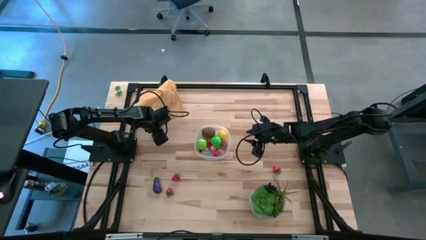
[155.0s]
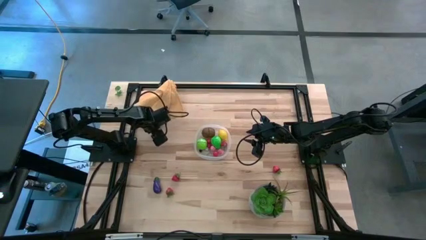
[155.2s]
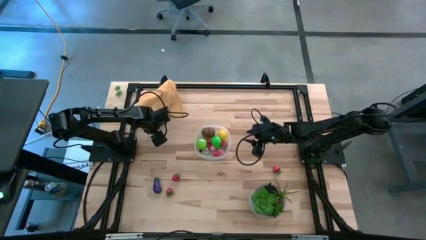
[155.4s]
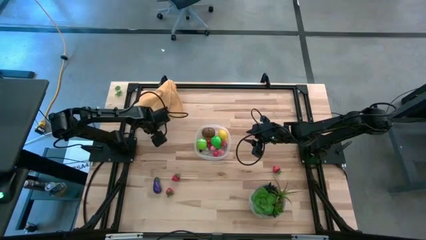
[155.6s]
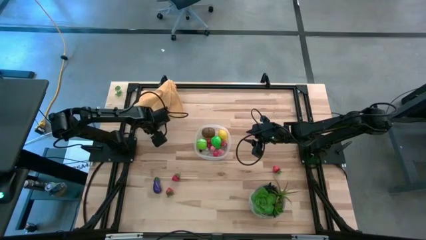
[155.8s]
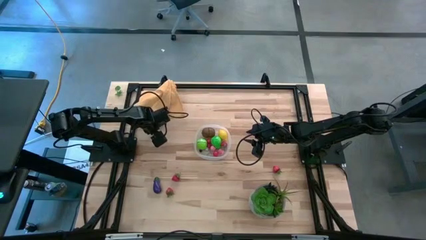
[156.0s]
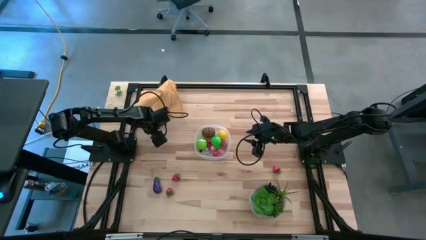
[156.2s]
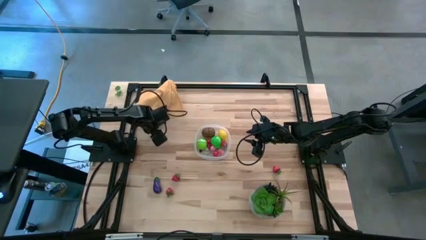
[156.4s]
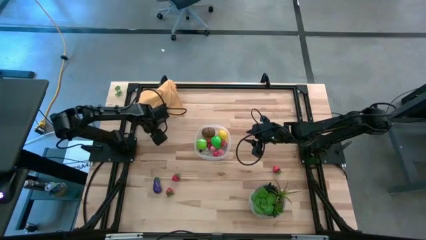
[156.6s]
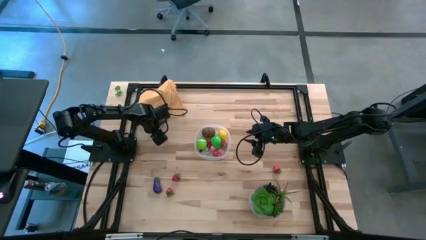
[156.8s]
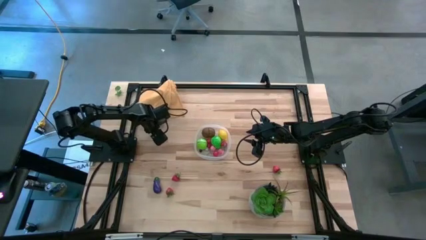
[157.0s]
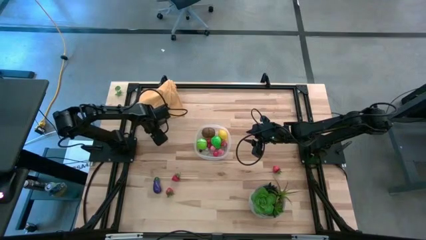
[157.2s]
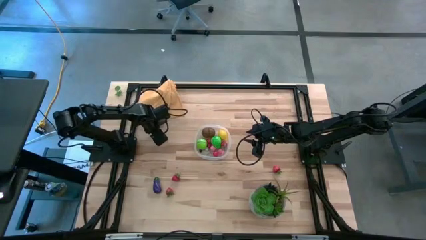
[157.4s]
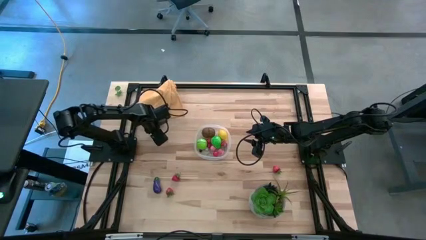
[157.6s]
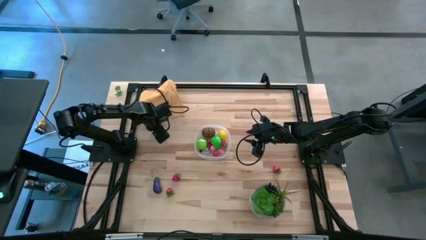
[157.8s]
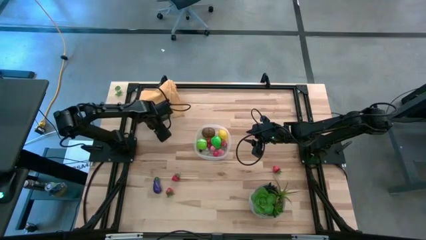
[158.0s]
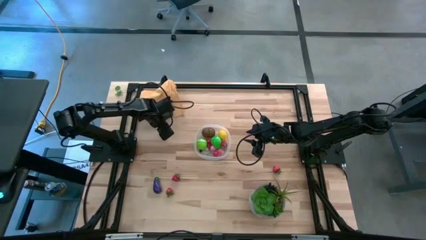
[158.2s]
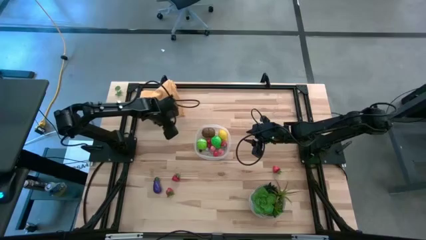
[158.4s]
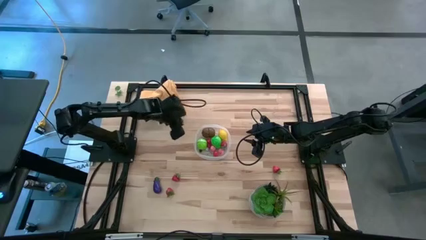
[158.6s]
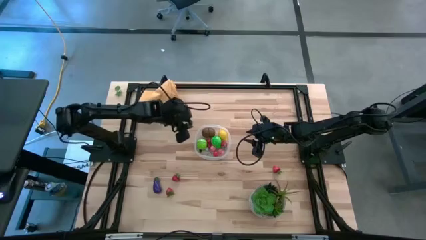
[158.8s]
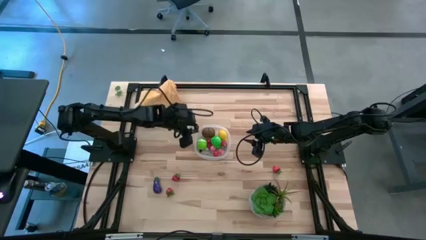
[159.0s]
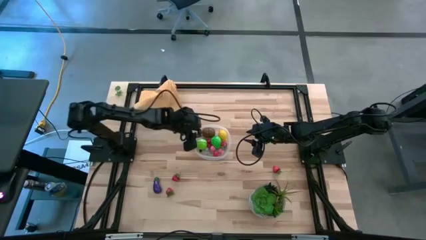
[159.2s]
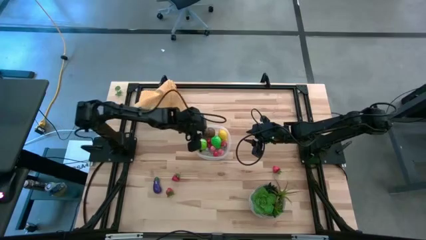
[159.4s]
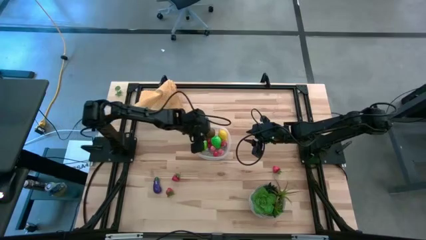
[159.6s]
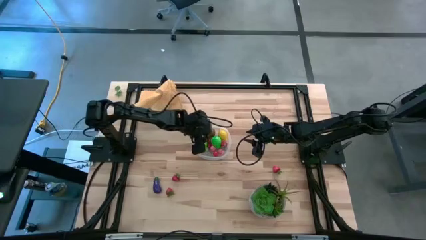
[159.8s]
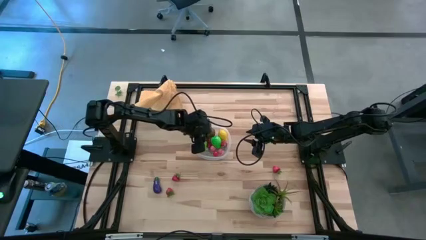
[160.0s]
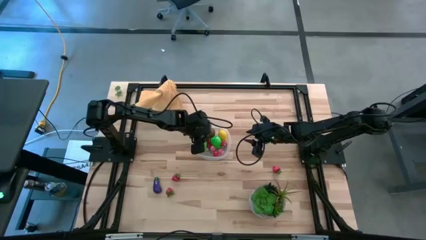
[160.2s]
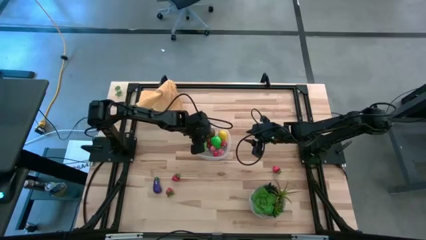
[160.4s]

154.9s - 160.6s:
Task: Pick and placing Produce into tupperware
Put the blackberry into the transparent bin

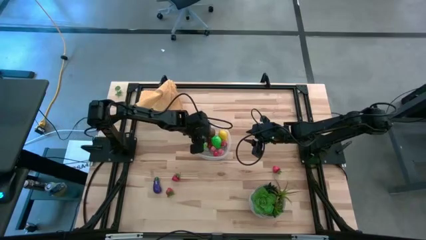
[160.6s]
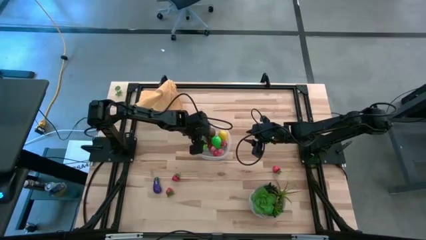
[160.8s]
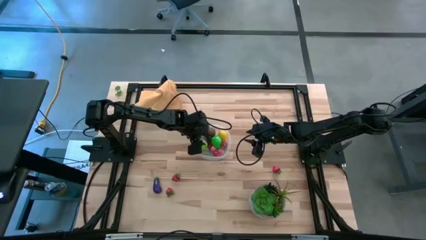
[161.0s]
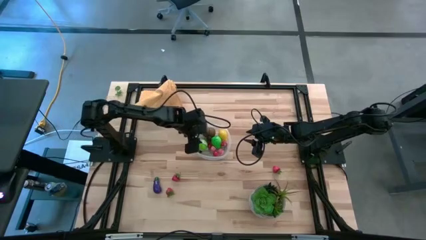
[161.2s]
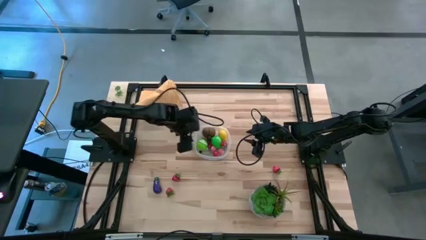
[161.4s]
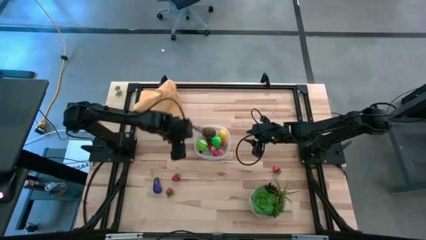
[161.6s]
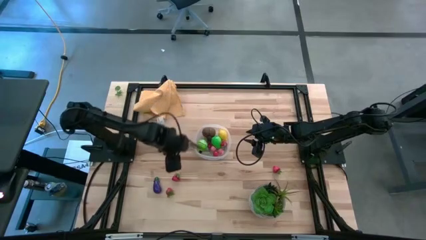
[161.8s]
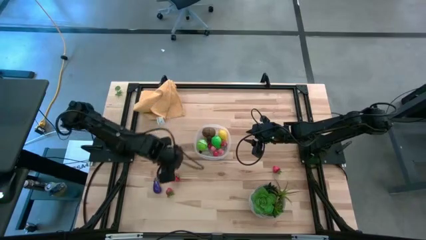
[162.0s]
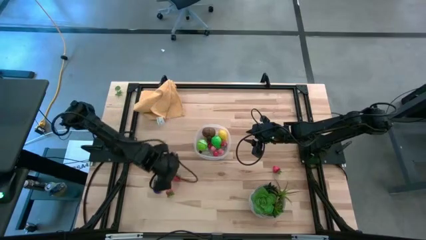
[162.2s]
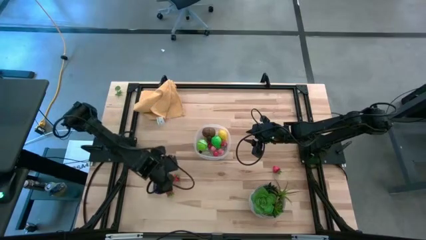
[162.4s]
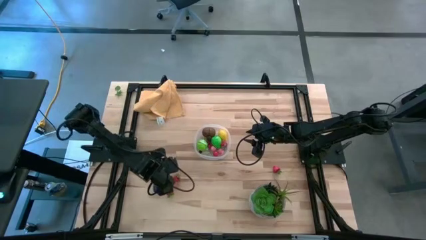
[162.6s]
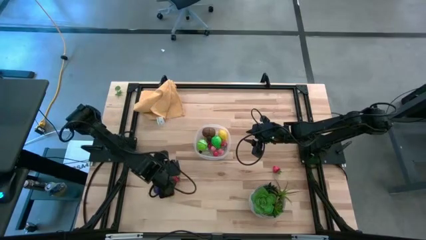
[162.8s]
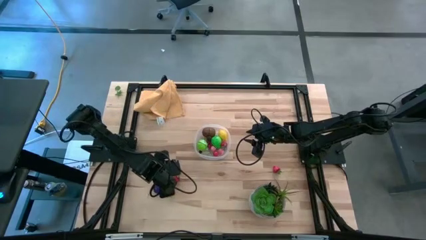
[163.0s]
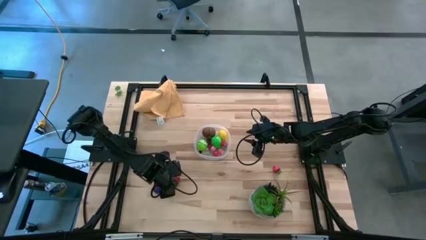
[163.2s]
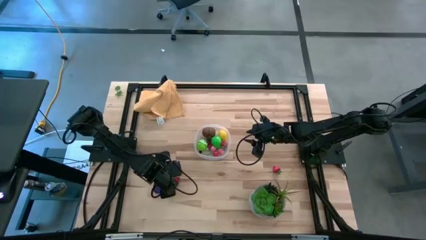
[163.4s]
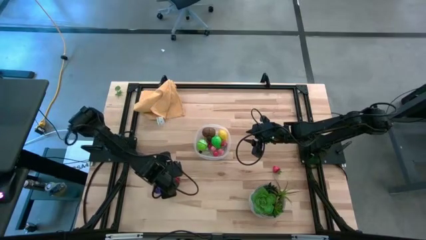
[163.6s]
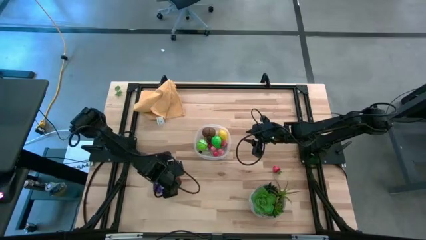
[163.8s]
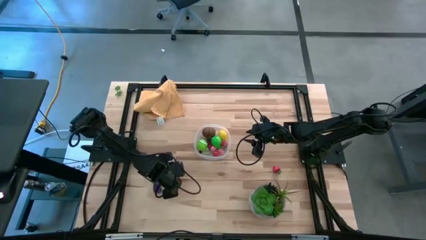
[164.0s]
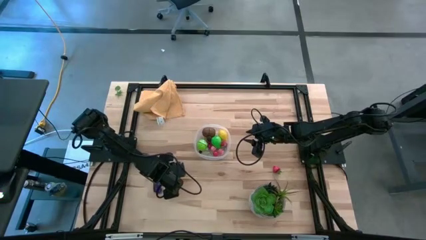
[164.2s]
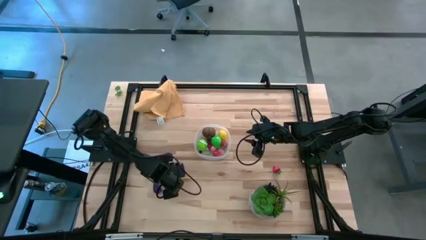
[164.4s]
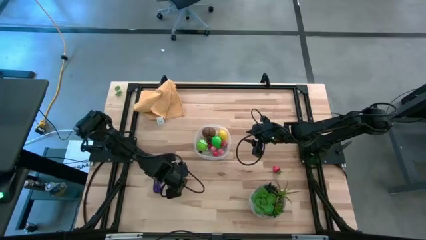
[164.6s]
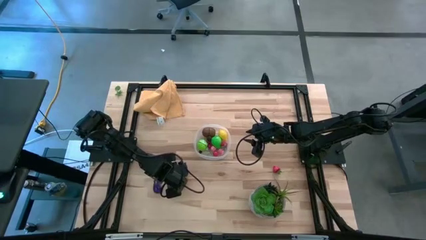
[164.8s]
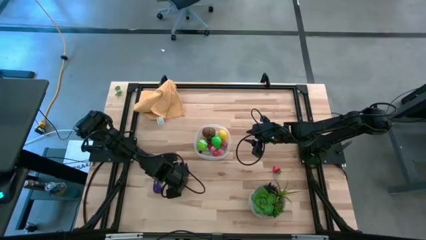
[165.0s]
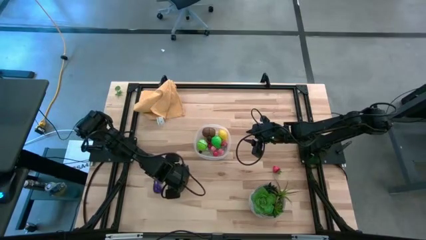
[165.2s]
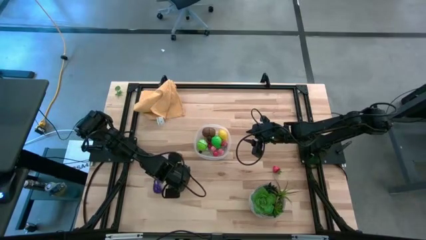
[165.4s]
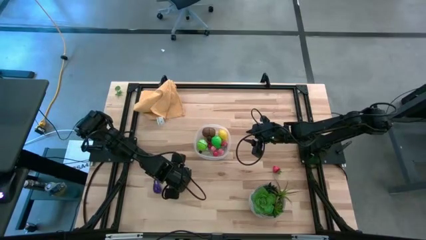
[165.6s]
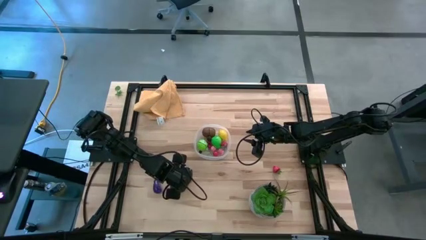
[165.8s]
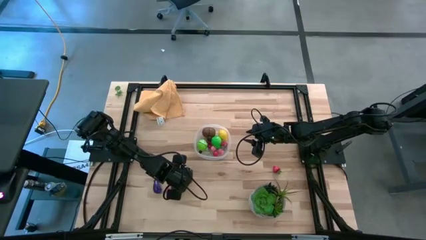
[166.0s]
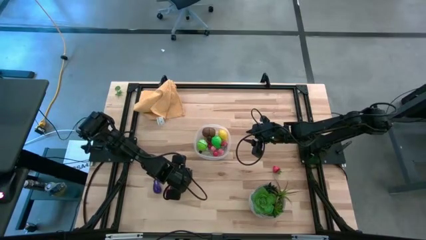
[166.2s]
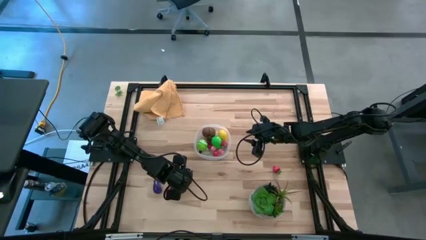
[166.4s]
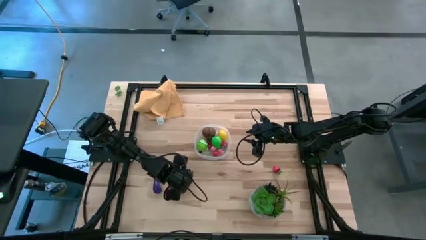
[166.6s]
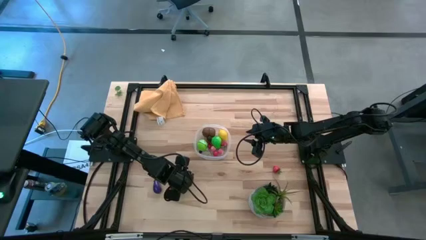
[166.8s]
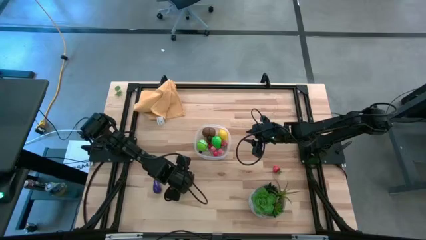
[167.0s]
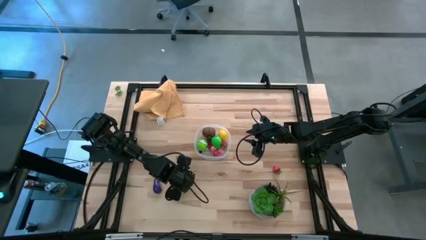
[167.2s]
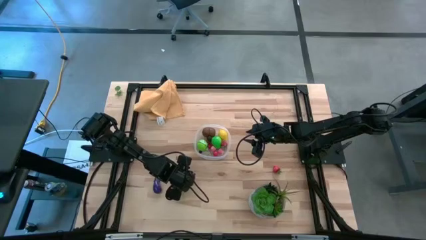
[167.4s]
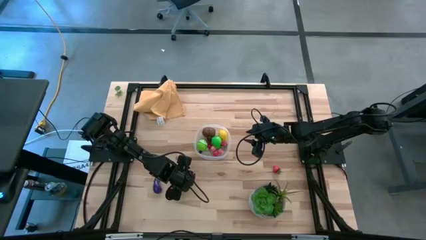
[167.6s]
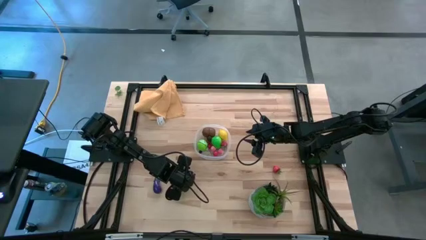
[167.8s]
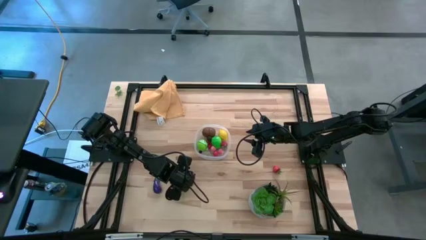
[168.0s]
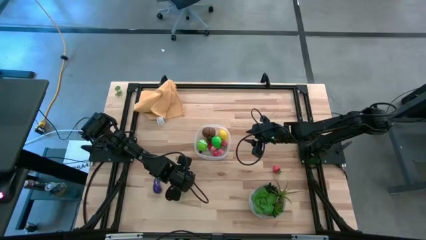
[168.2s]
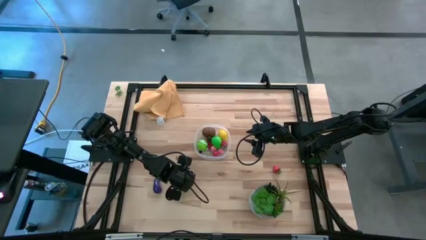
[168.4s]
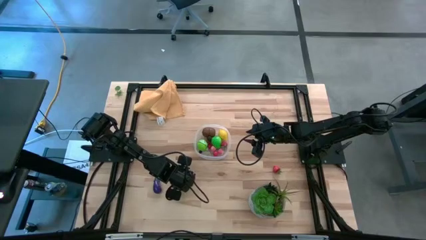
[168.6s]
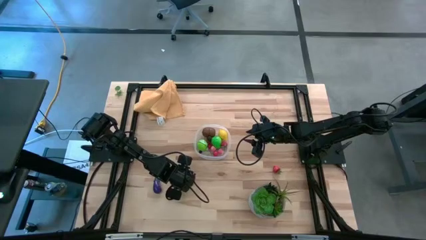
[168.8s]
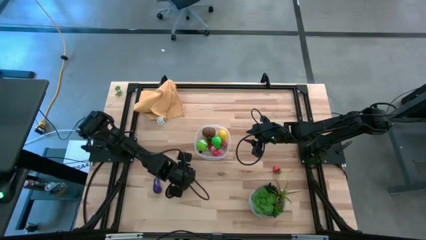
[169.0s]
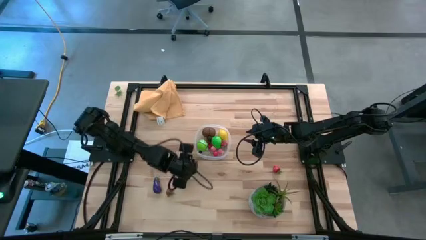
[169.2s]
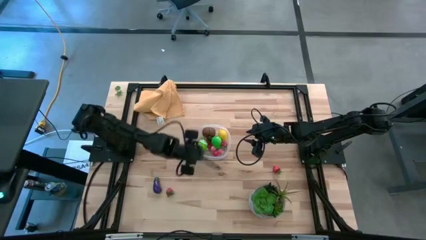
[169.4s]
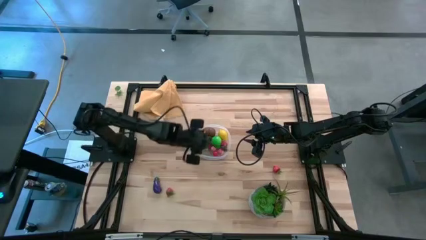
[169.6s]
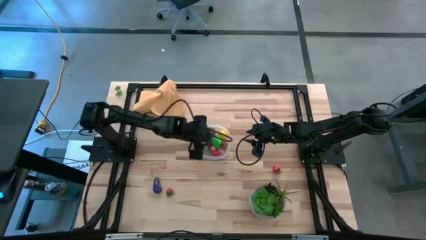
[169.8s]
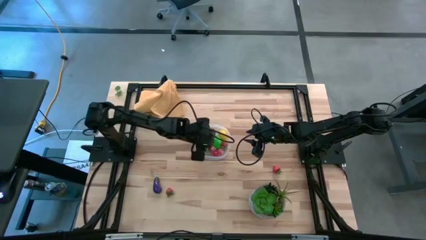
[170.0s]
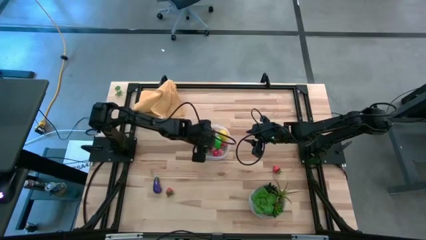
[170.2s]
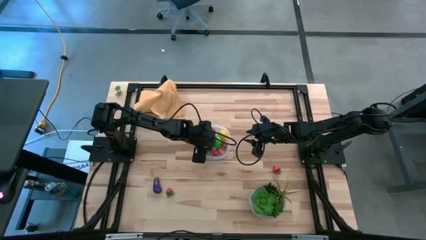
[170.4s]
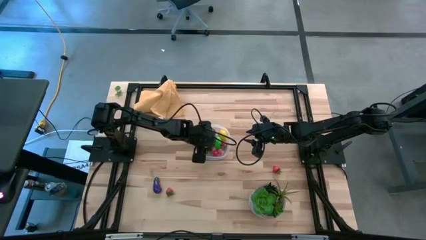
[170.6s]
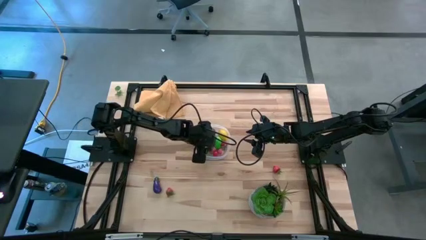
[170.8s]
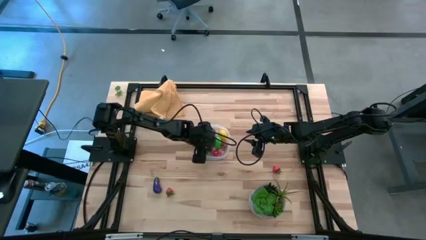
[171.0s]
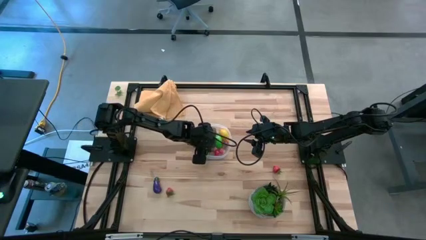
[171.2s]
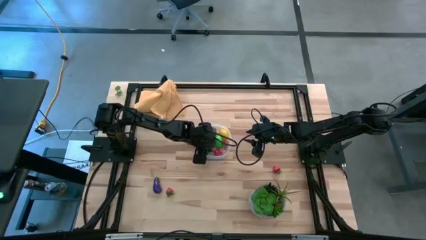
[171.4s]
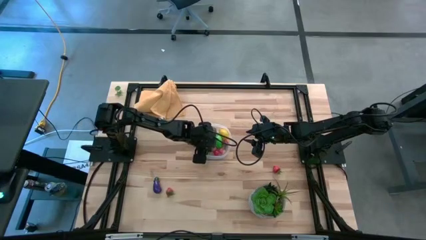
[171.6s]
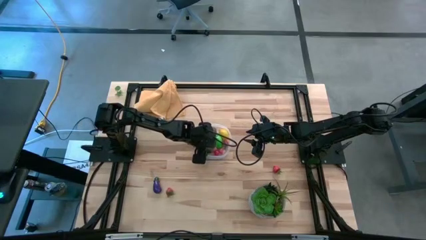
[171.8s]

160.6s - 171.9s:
Put the top left strawberry into the transparent bin

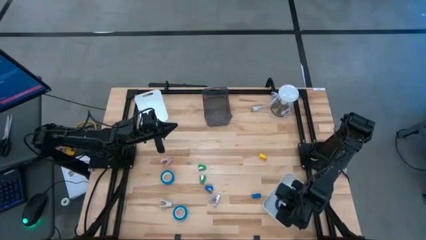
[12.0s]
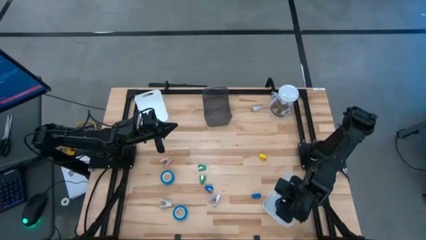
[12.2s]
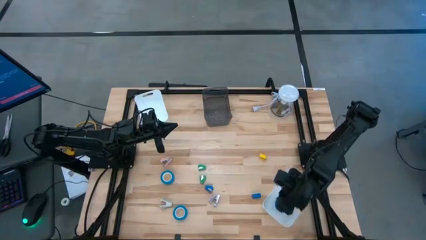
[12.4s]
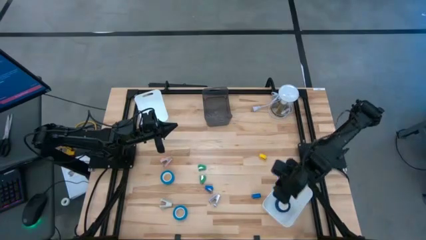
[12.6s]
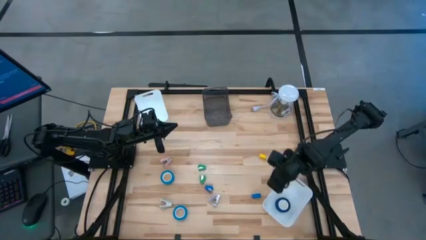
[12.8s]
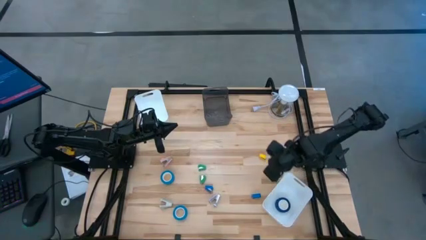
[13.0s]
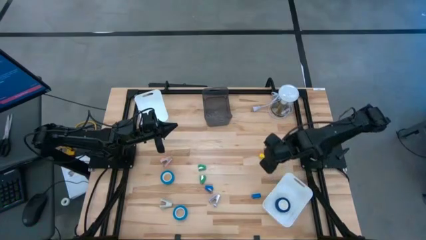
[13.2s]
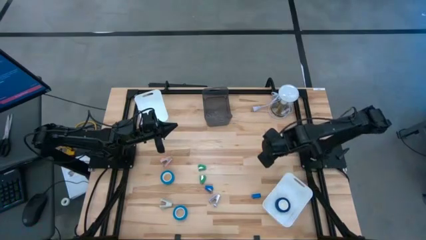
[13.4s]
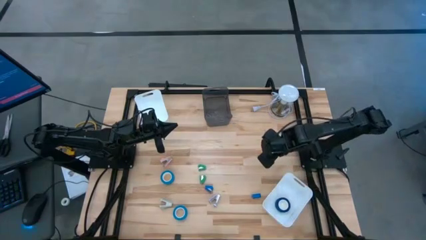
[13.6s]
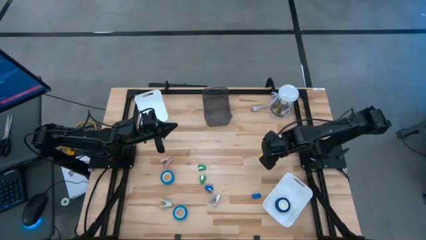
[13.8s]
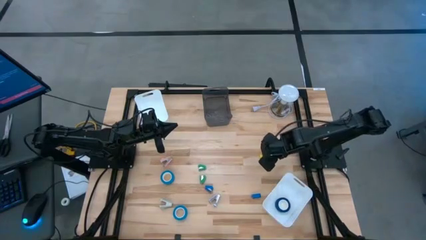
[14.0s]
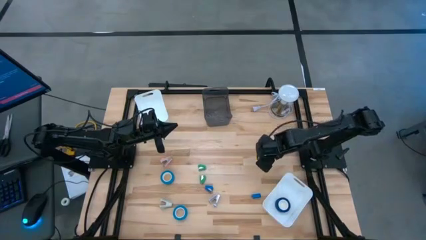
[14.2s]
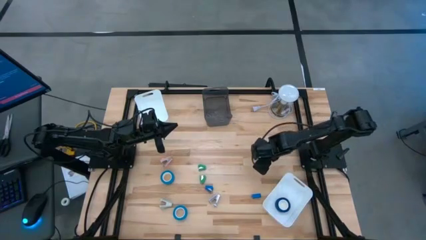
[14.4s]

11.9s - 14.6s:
Task: Pick and place Stapler, Stapler remover, tape
Put the yellow stapler into the black bin
